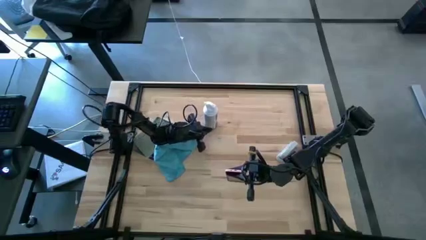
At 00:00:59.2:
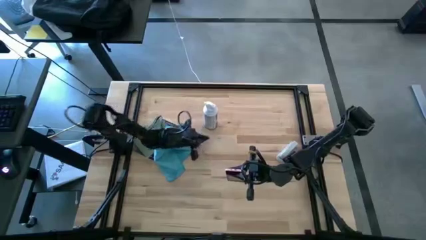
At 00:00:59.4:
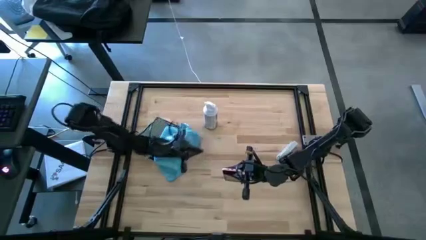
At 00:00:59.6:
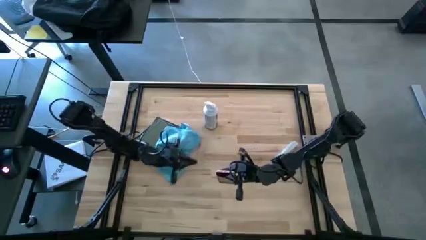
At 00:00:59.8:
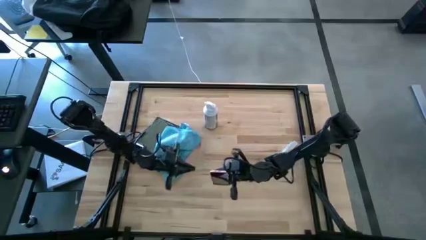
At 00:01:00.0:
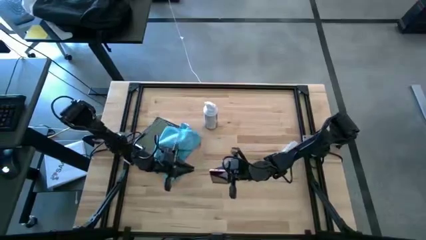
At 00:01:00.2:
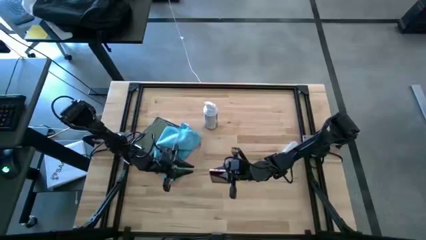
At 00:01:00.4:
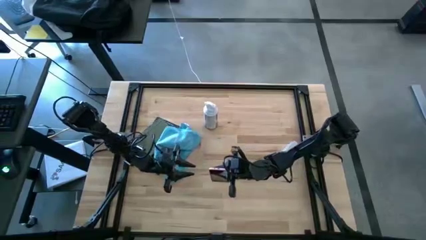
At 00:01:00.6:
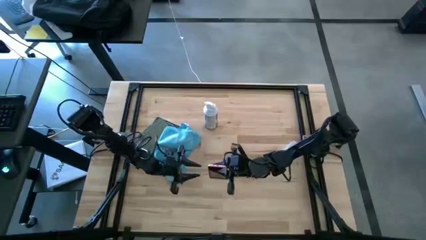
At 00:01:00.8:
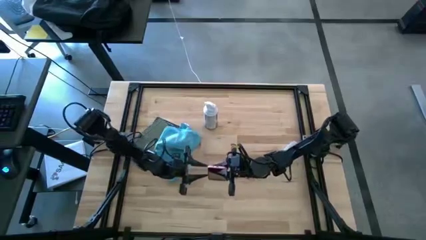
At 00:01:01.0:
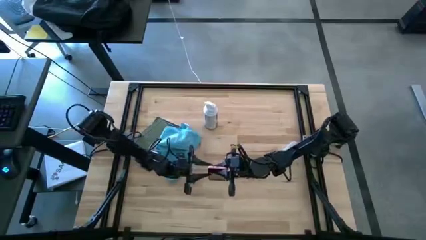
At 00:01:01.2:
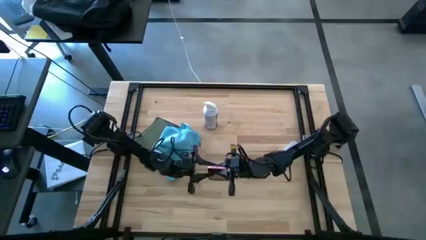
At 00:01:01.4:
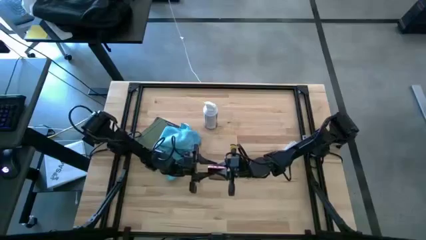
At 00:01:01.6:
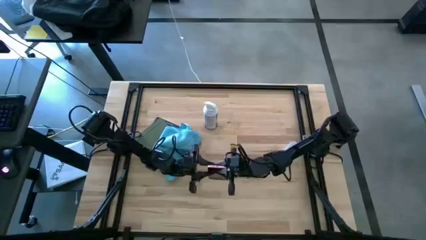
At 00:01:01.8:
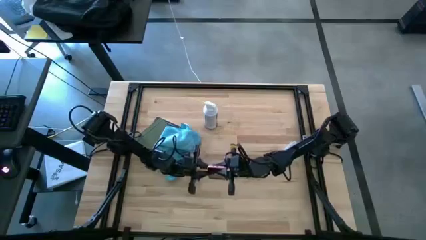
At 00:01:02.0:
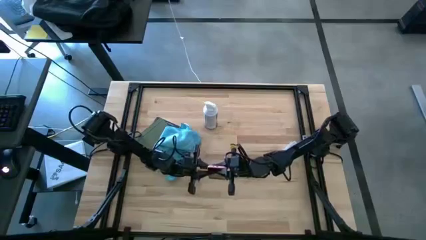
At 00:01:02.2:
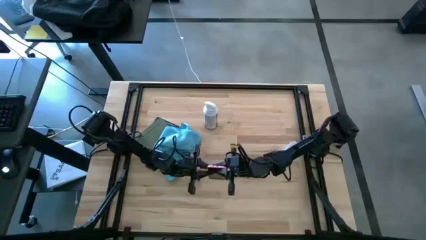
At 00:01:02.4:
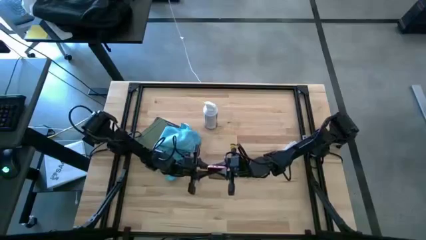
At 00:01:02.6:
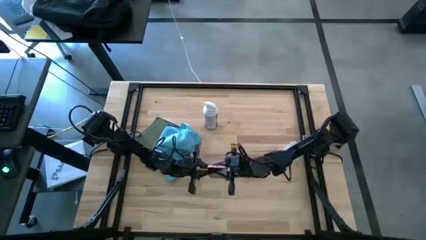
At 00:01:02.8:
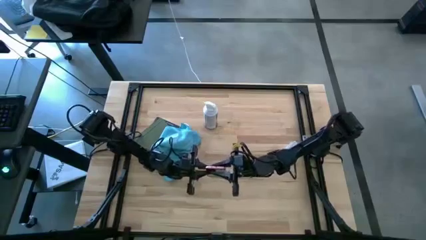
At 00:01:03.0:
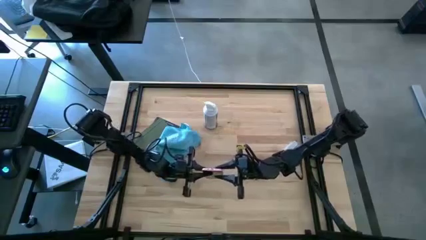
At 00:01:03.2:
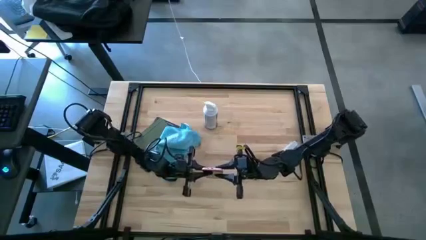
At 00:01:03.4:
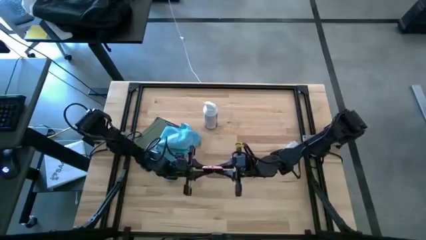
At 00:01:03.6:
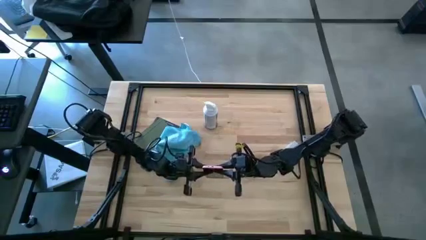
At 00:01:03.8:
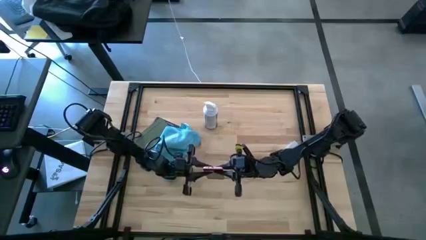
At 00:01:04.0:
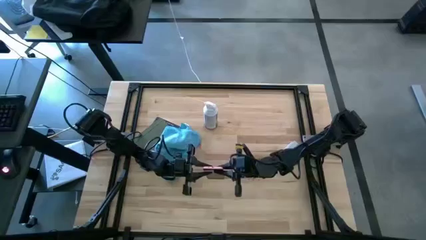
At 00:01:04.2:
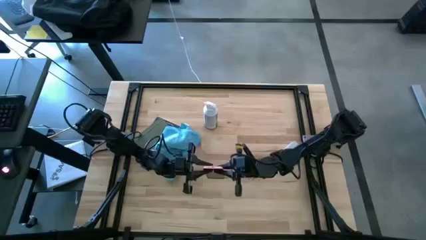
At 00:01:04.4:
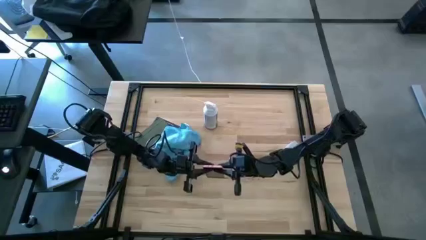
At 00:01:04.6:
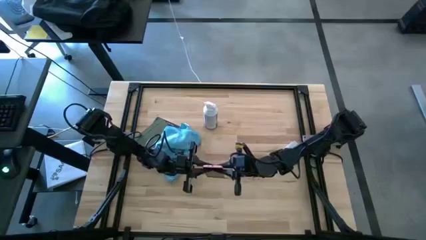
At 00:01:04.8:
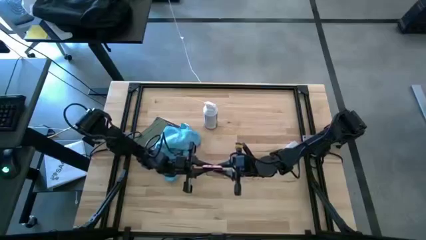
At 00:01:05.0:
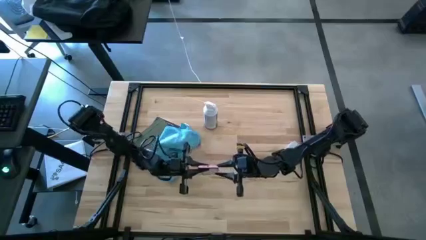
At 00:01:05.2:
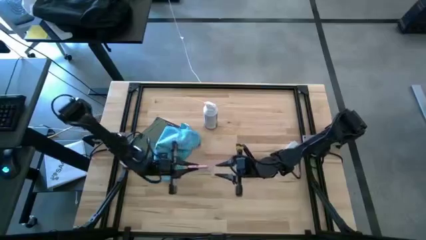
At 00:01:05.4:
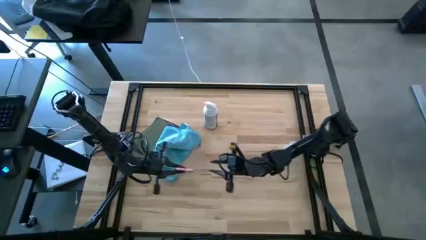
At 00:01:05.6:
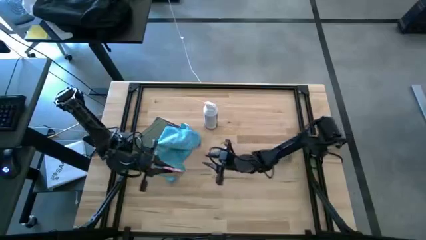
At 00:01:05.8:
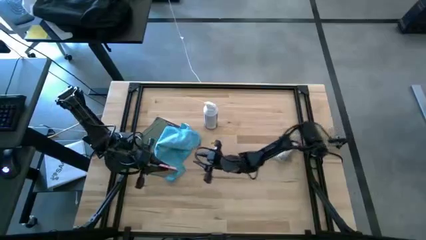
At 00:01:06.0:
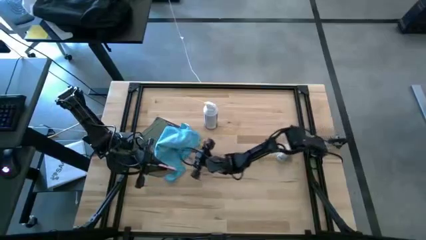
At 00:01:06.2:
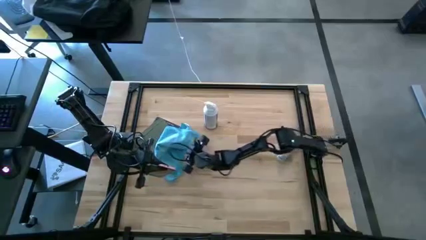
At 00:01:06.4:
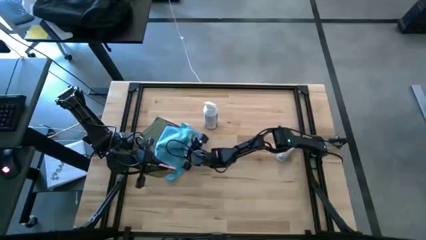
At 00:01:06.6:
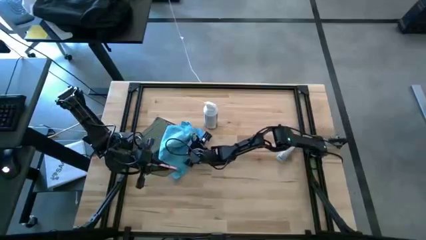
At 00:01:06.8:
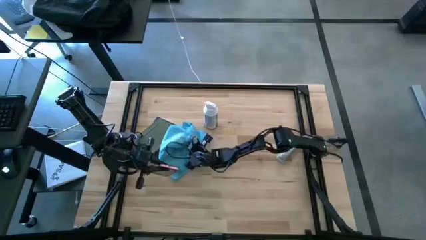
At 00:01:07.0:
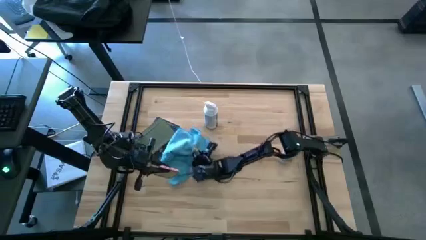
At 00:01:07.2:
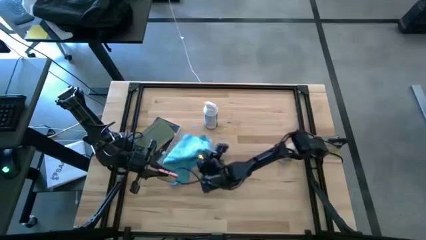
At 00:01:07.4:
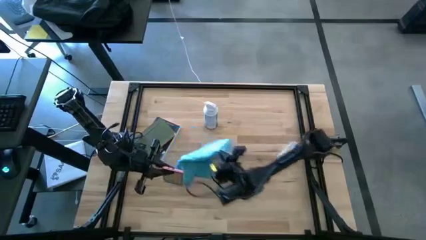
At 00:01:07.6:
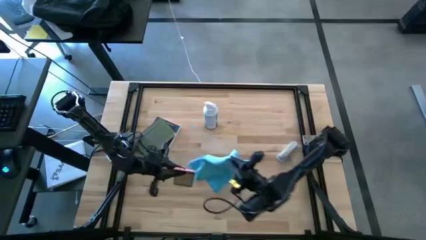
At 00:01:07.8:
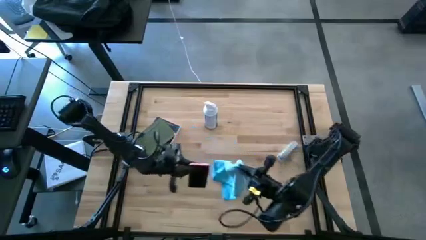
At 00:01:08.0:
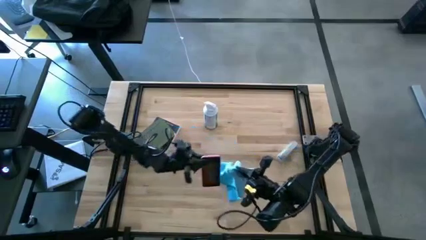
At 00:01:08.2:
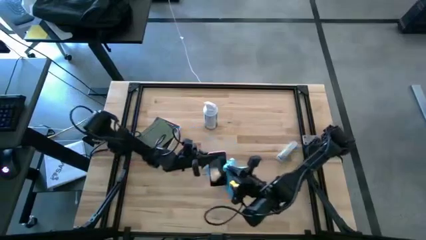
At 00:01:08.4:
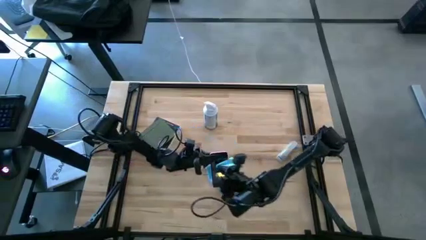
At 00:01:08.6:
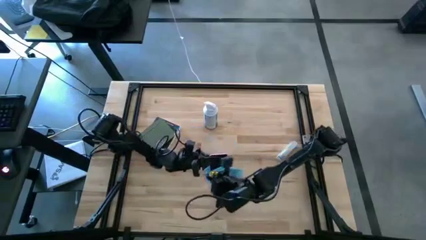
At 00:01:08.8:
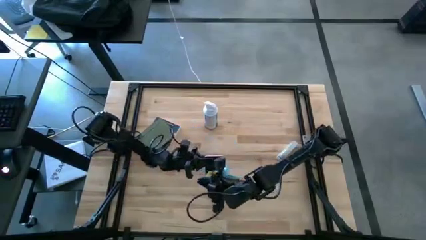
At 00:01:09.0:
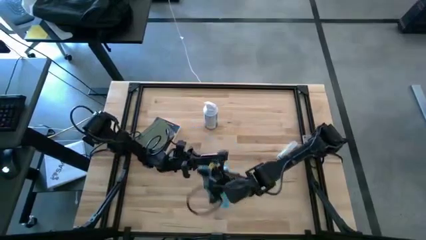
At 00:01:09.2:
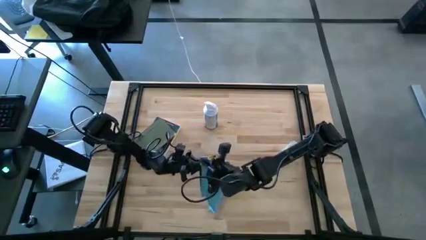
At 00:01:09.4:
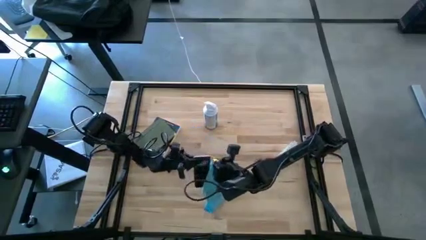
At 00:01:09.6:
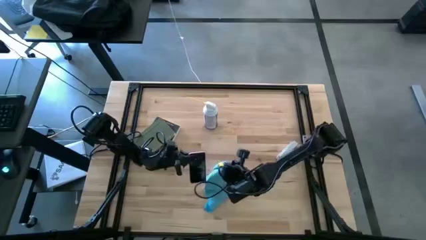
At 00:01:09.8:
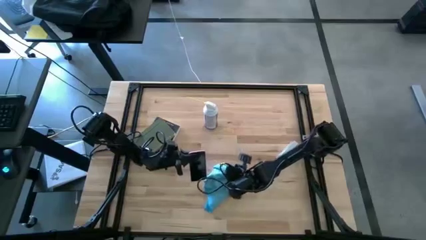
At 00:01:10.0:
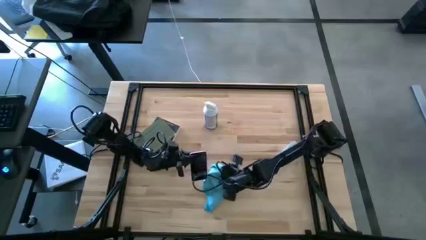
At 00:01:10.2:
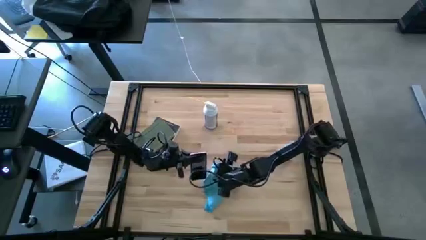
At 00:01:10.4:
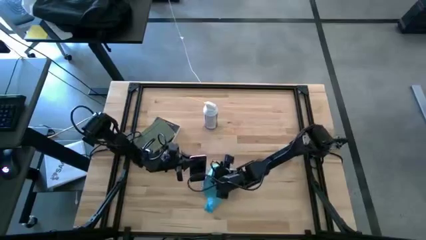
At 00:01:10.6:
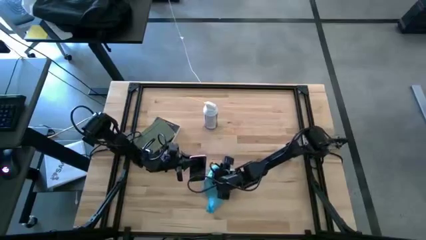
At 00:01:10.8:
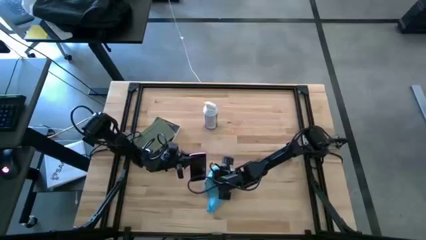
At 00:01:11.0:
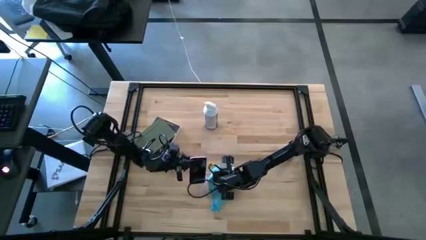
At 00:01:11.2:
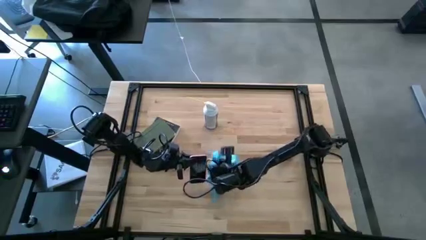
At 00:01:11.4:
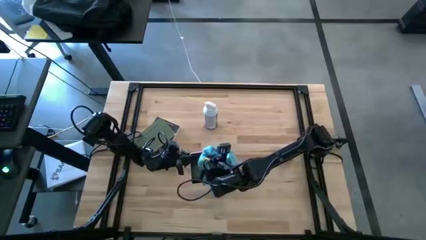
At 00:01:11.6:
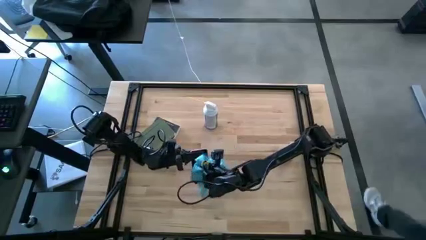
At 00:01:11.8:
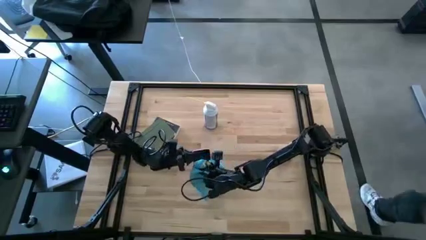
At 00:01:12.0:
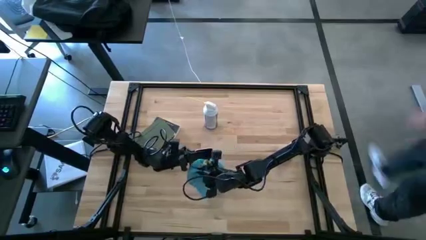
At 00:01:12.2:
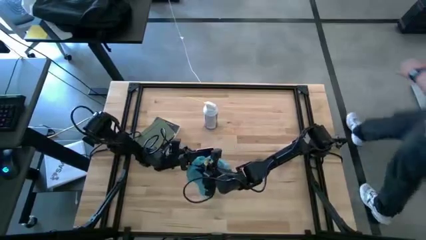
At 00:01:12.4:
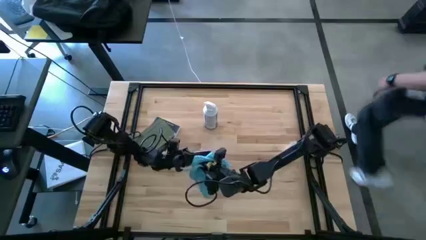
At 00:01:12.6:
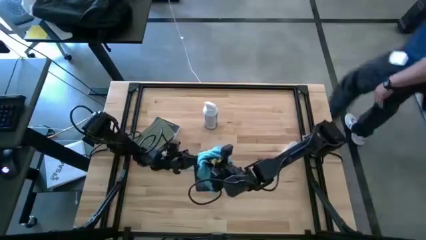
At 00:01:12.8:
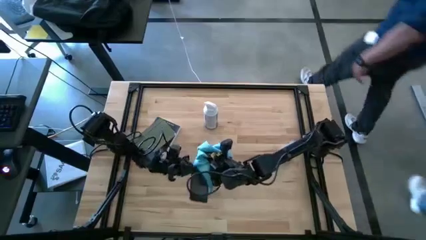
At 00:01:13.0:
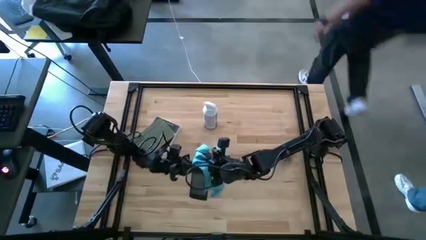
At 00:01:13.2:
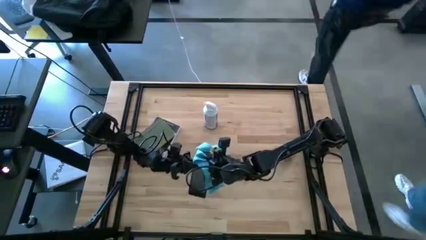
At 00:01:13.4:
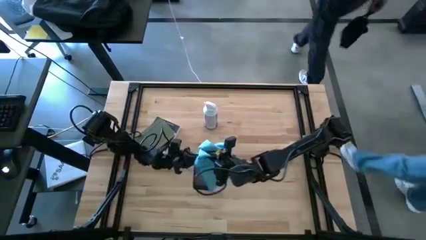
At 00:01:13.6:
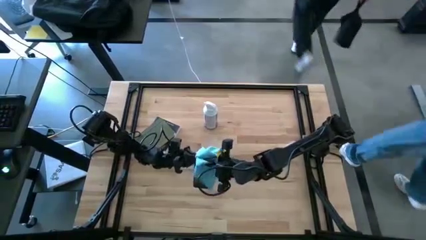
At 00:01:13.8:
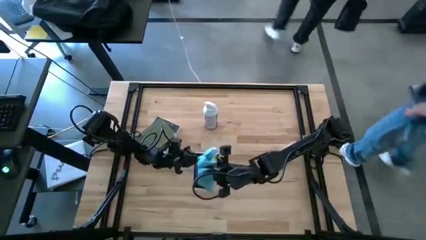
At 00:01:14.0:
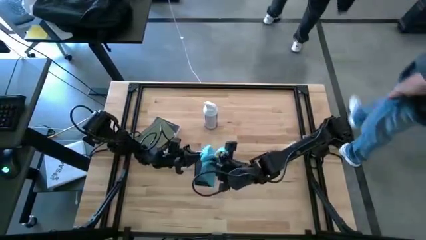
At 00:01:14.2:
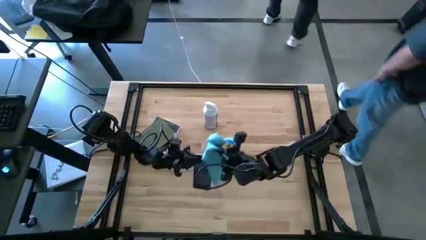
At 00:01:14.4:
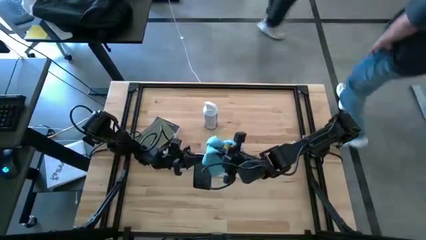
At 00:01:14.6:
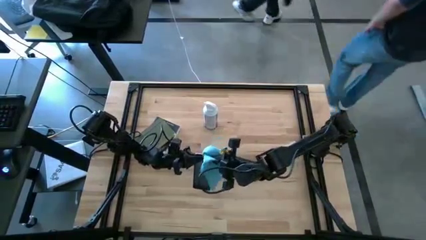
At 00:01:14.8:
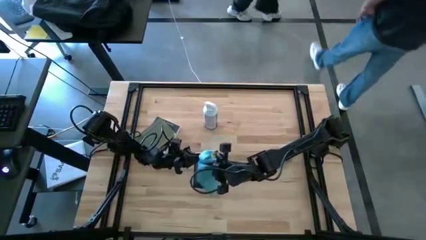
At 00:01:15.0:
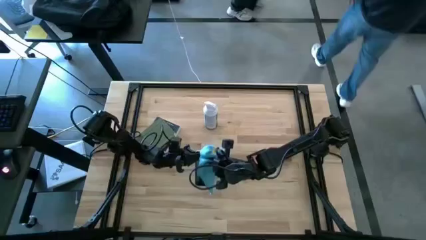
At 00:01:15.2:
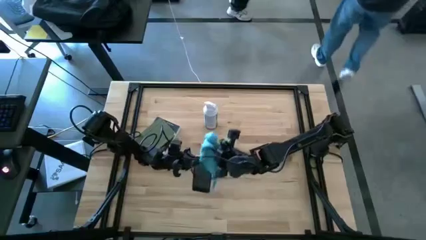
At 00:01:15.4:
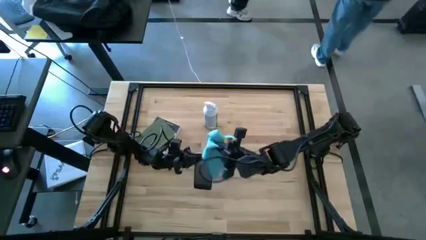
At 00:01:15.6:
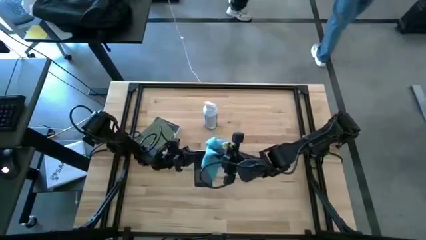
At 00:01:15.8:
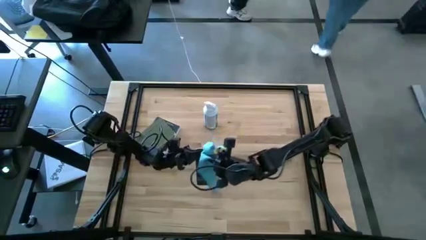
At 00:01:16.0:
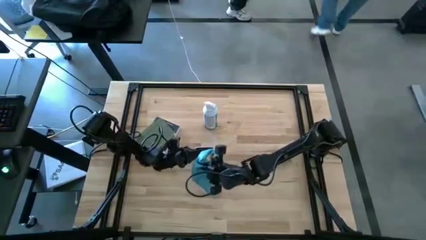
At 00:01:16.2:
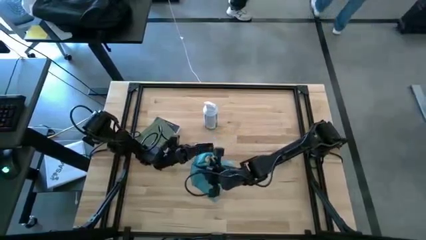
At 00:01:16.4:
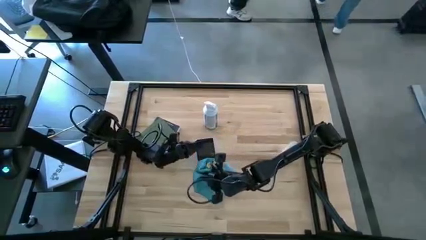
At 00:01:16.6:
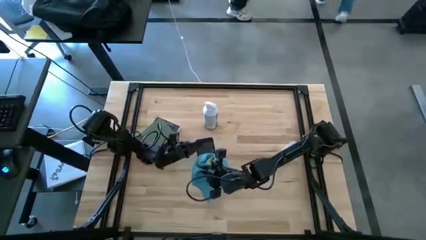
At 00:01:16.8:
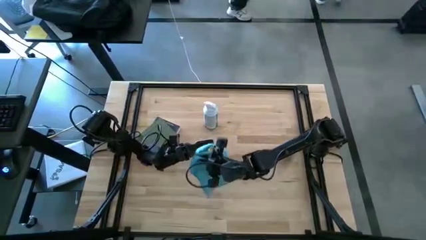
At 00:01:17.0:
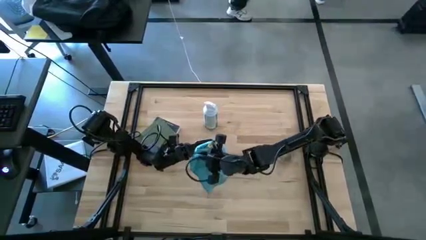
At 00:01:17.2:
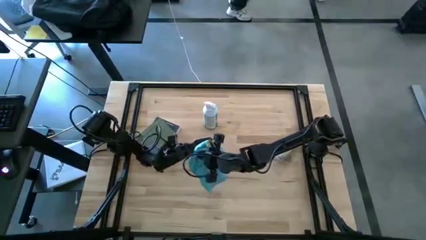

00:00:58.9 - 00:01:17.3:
Task: Apply microfiber cloth
Wipe the cellphone with the microfiber towel
